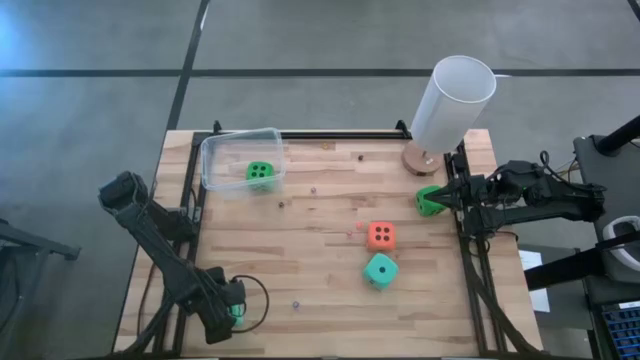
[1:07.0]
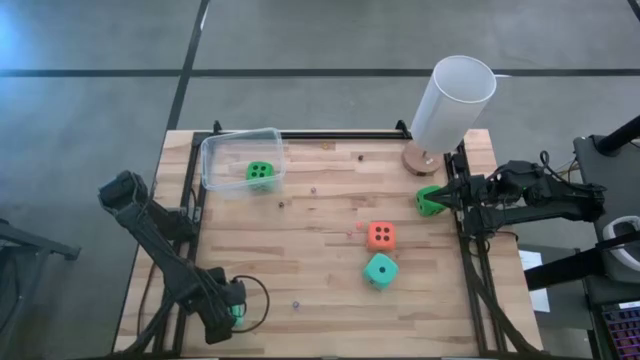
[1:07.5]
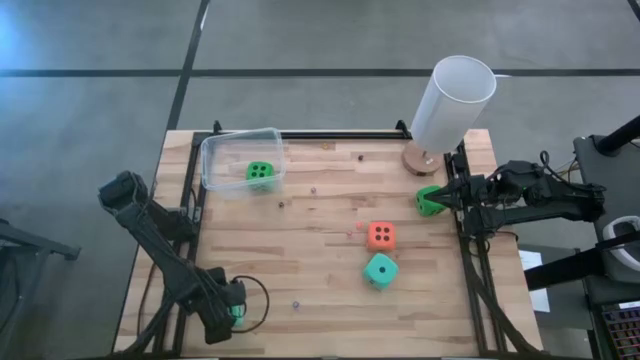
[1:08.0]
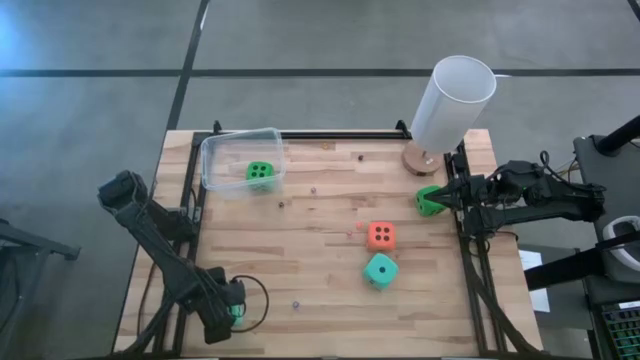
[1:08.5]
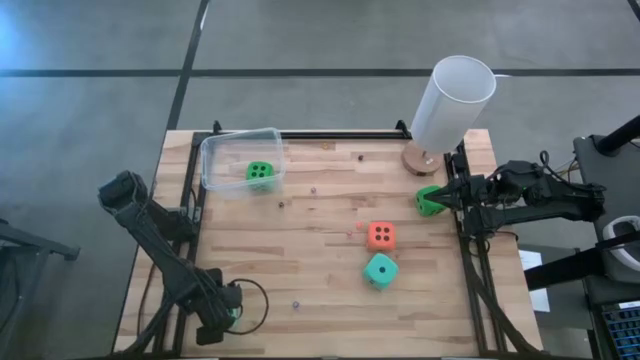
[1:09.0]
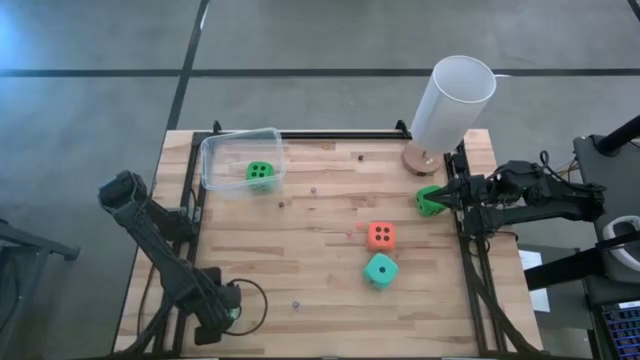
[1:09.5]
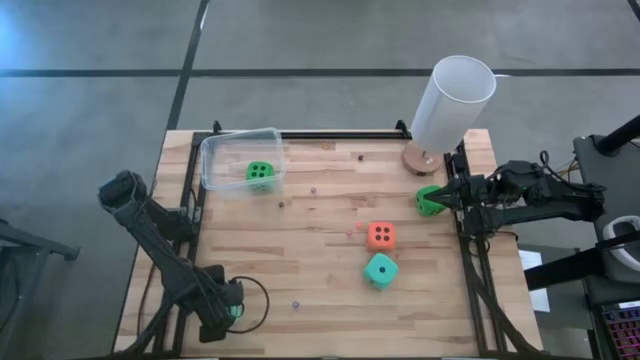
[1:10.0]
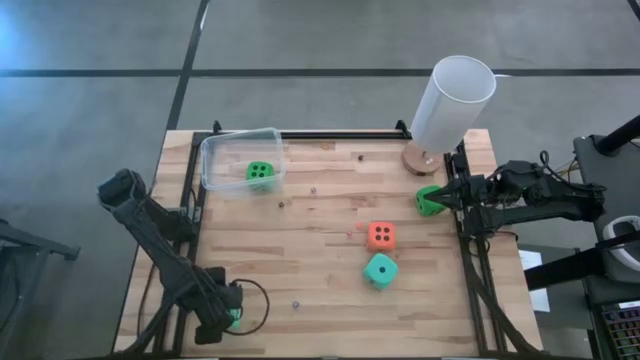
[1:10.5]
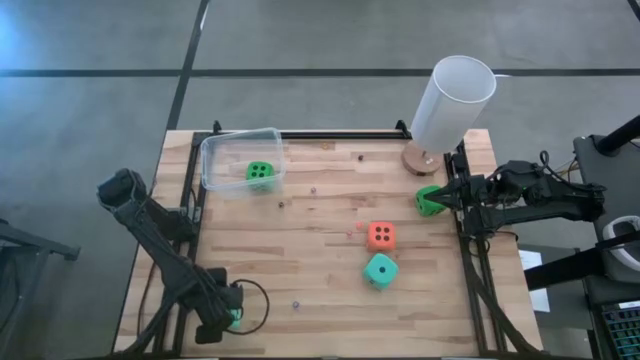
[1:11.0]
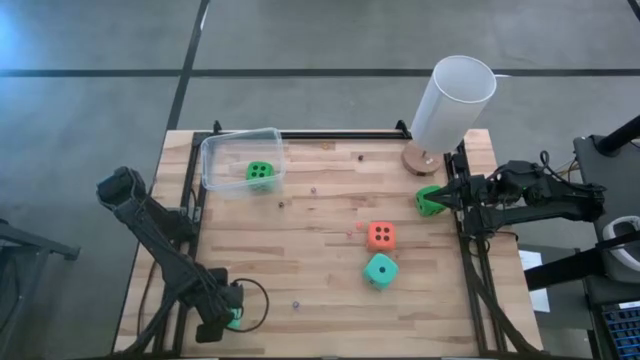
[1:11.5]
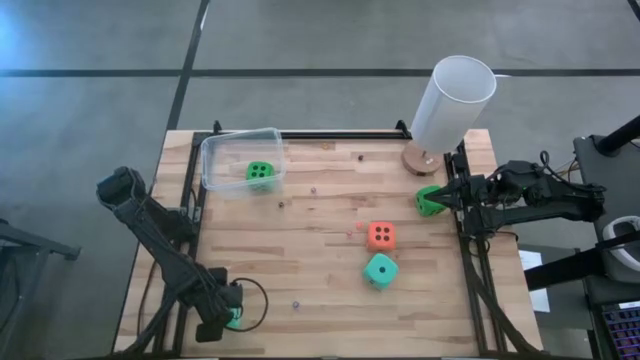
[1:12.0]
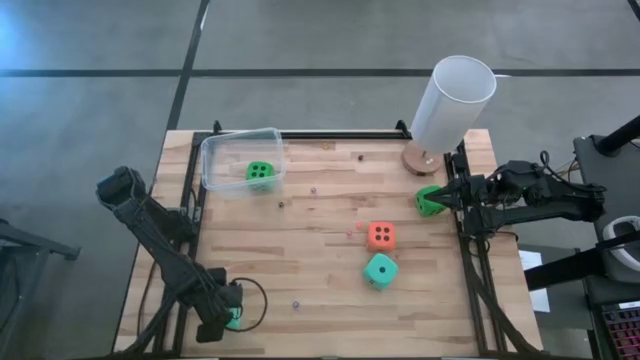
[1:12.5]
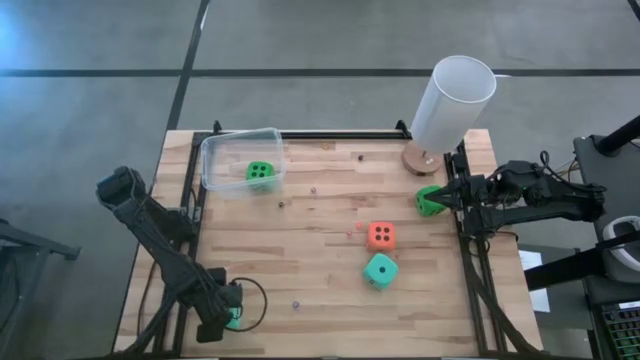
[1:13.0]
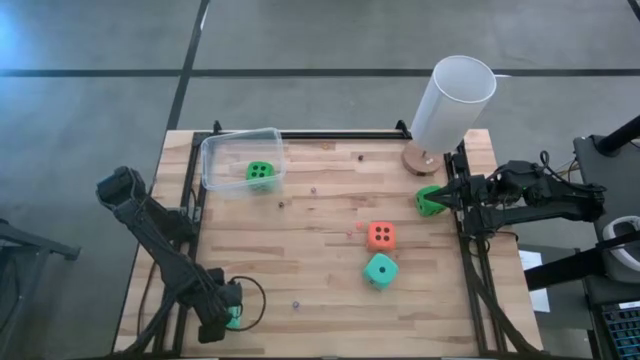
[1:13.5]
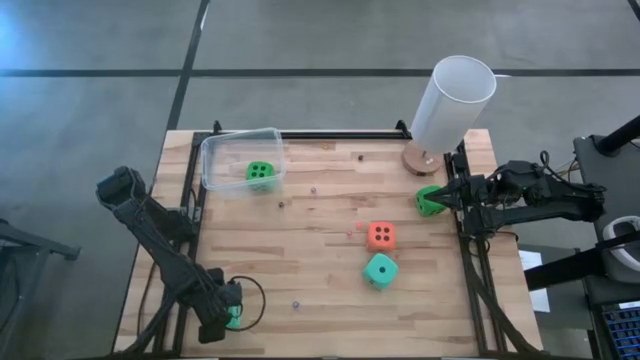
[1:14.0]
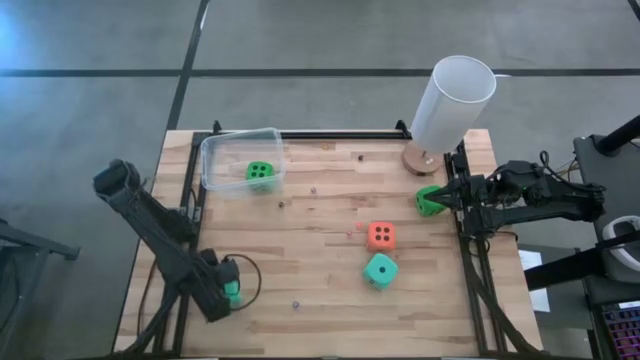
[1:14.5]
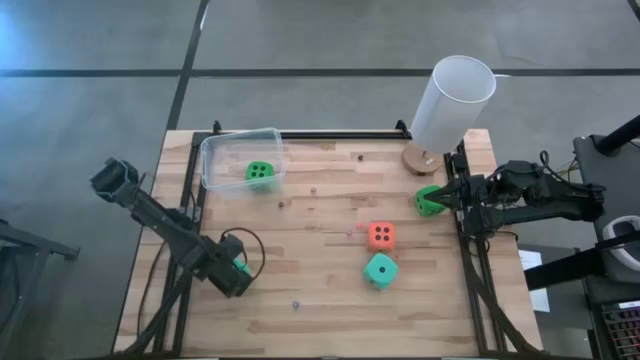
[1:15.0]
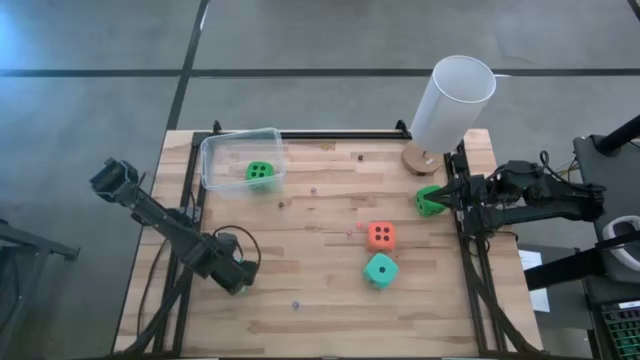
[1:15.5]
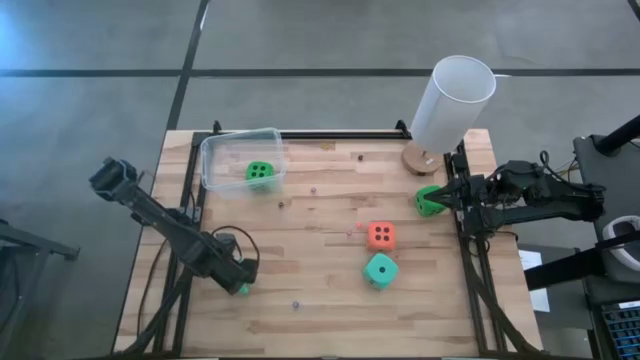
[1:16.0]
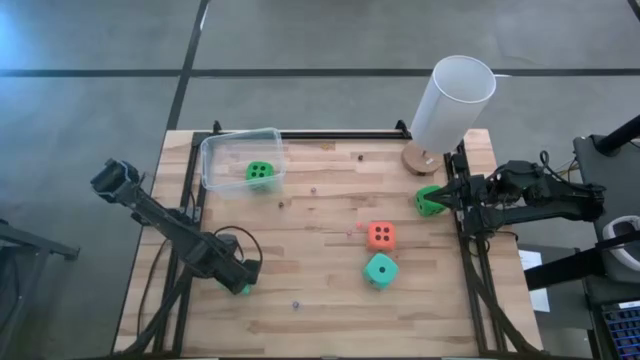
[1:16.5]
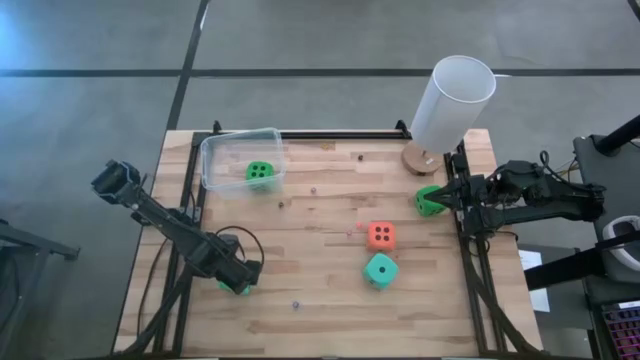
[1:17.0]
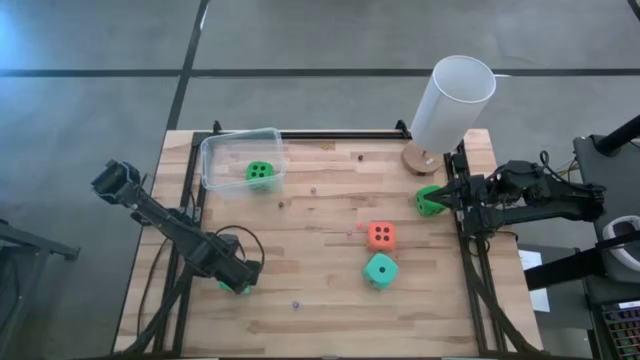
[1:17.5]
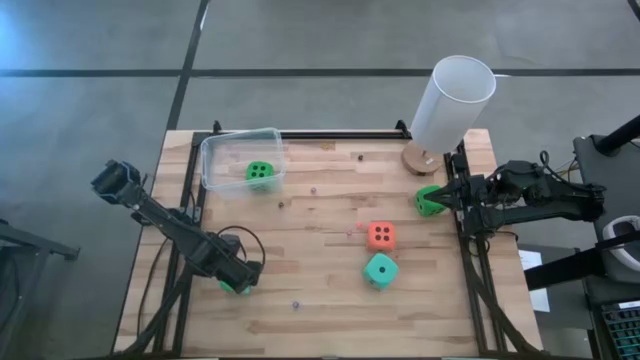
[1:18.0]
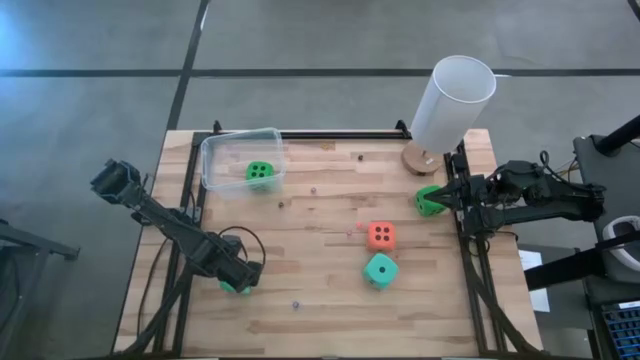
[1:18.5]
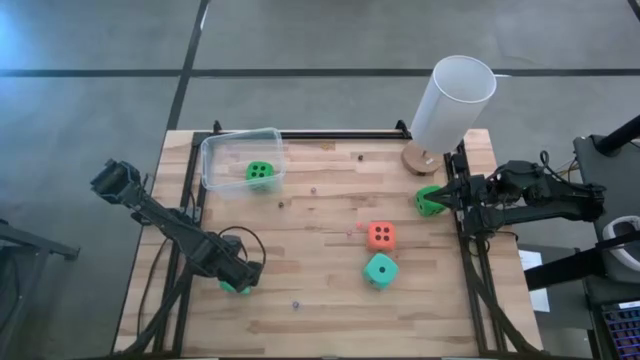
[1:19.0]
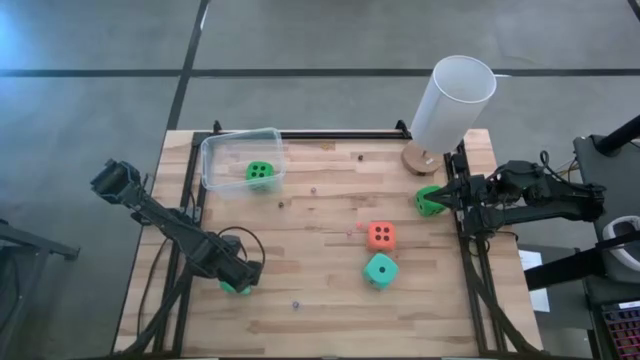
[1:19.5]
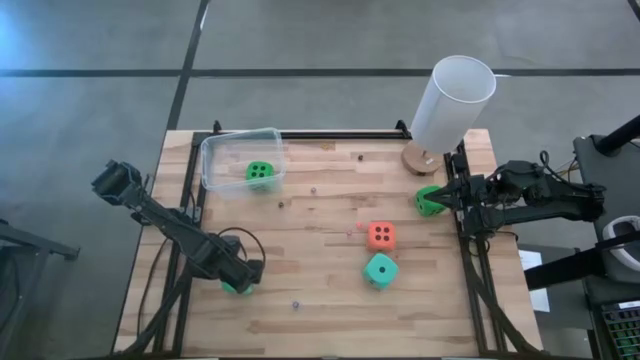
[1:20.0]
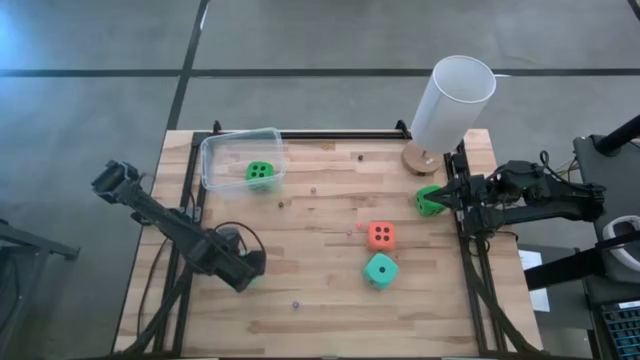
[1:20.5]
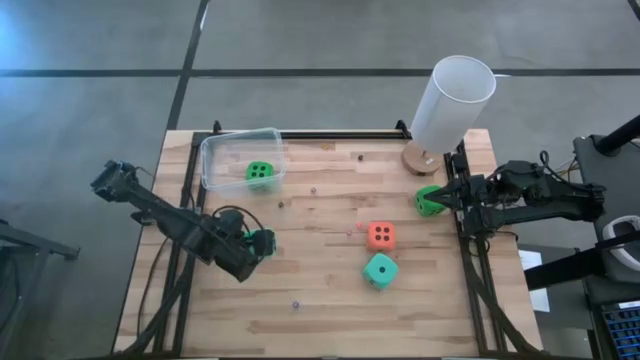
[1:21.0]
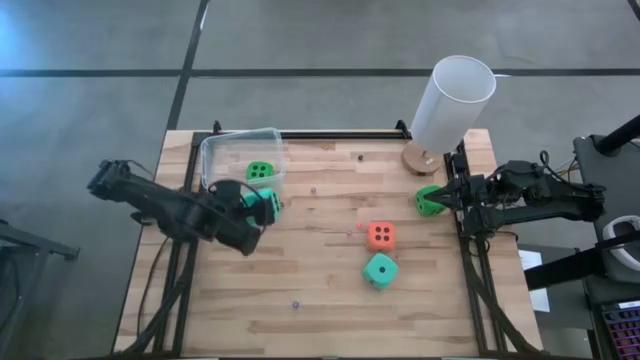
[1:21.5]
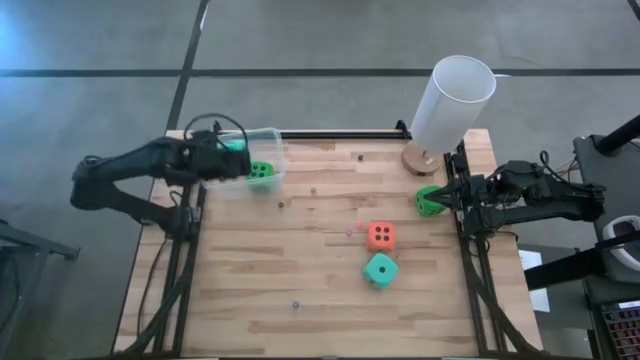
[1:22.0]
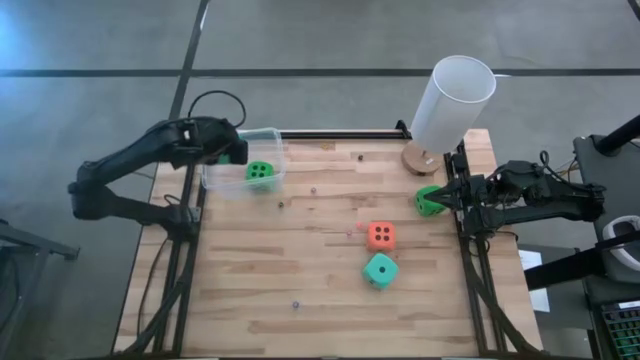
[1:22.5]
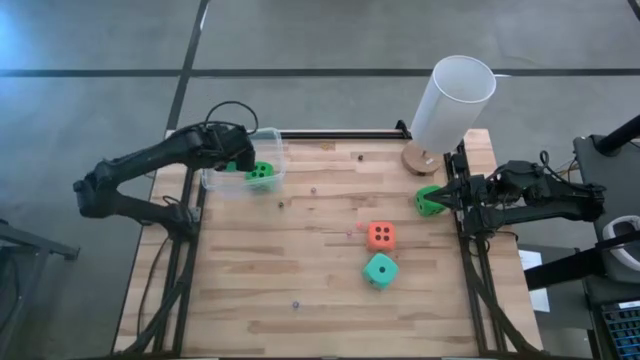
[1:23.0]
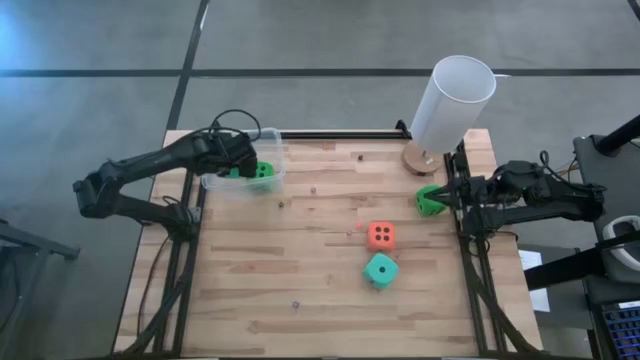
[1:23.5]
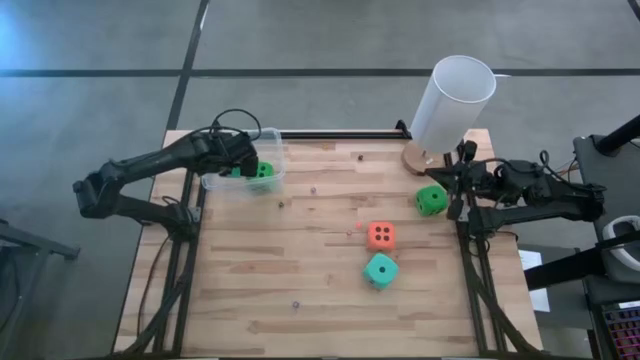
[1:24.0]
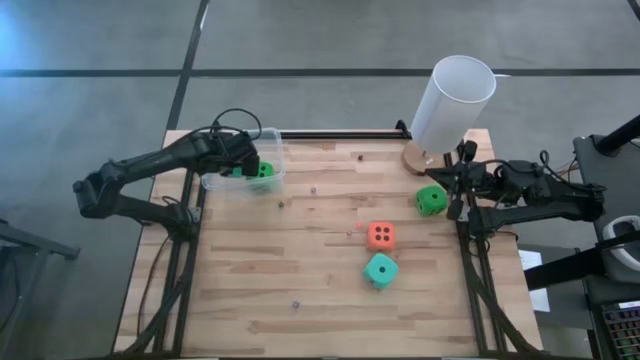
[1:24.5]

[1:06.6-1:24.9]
Task: Pick & Place Dice
Put the left large blue dice into the transparent bin

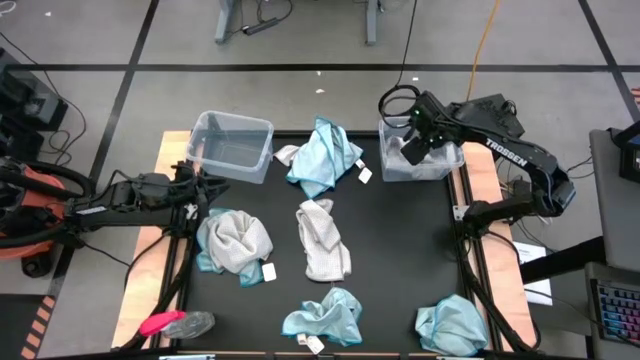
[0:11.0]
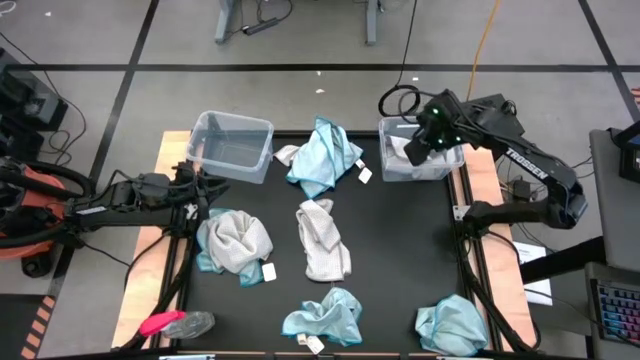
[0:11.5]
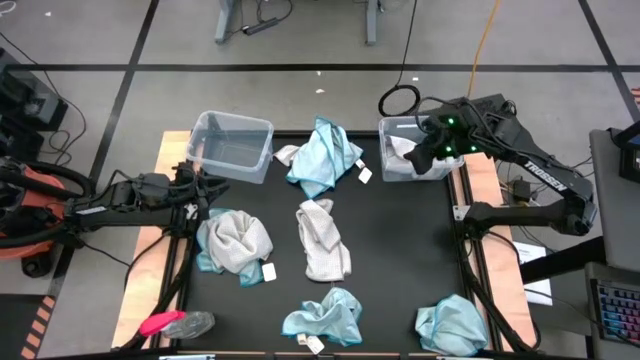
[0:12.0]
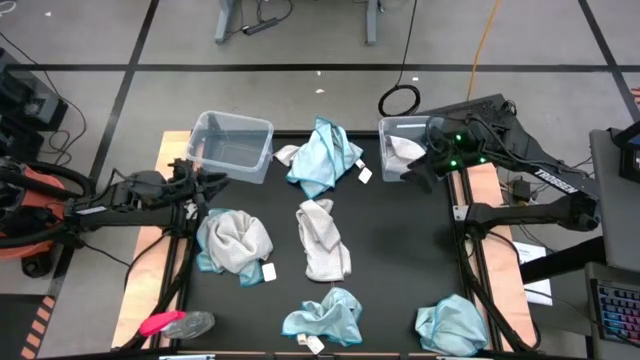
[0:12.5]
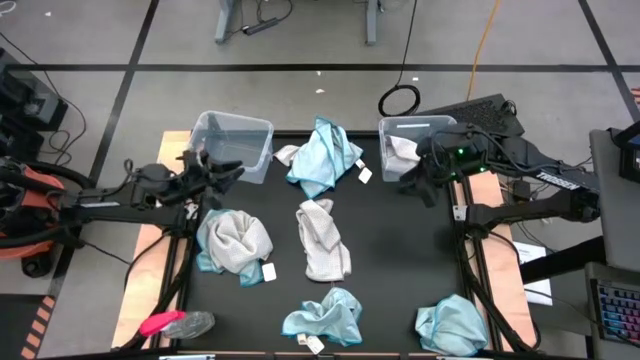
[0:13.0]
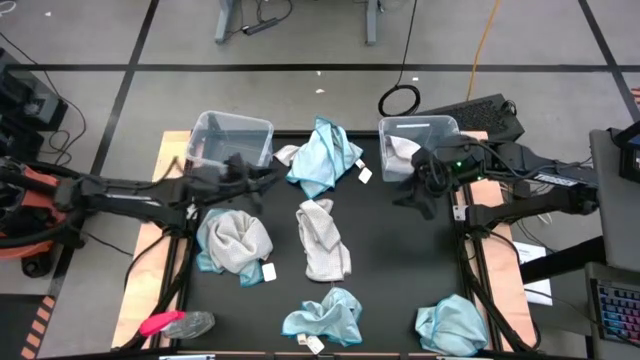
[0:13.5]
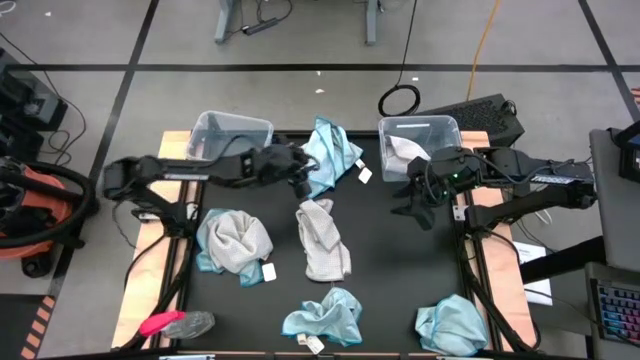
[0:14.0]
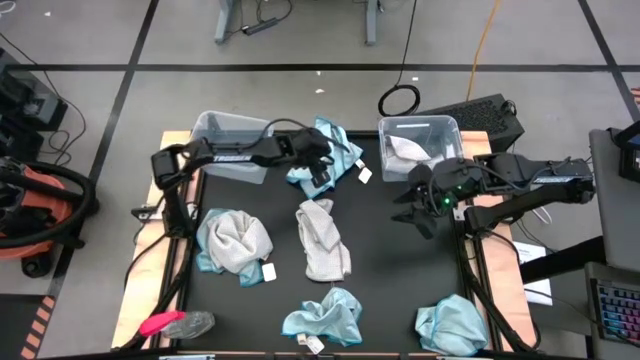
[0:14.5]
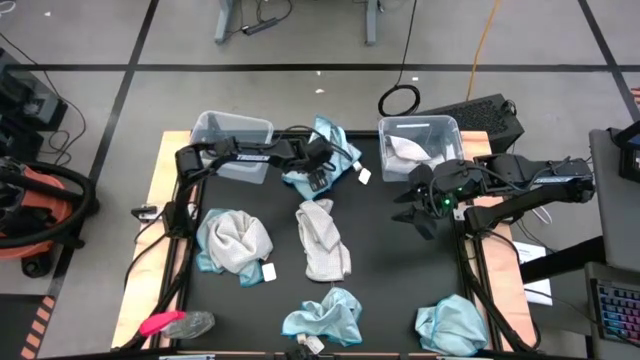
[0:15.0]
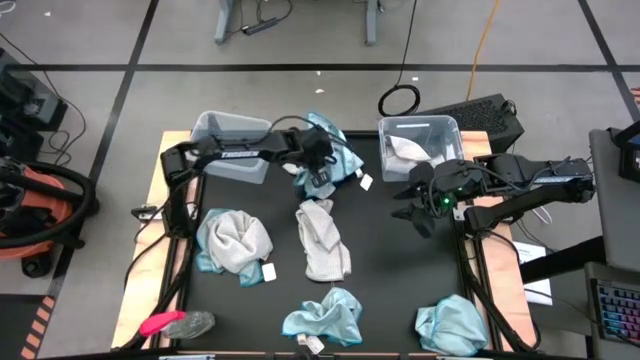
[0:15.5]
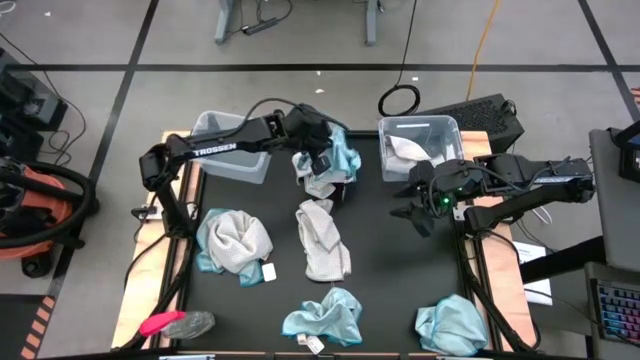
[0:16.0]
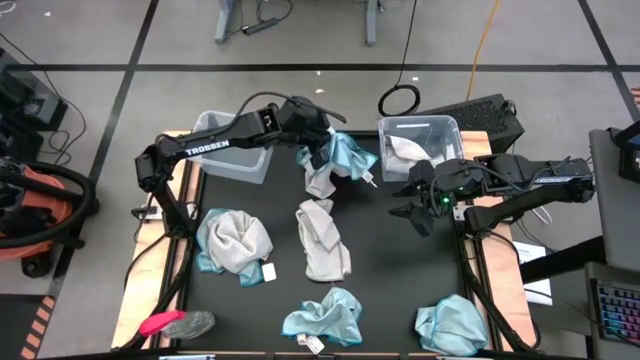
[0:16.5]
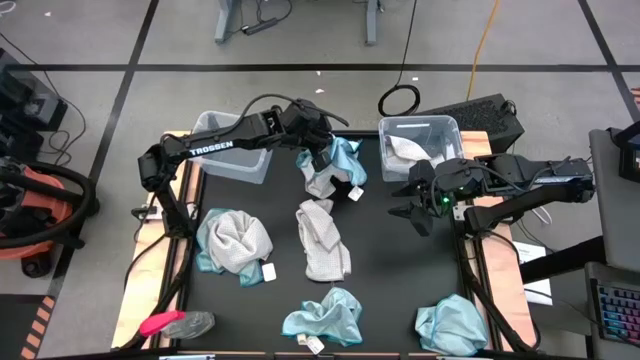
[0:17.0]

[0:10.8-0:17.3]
Task: Sort microfiber towel by color & place in baskets
Put the blue microfiber towel into the left transparent bin
